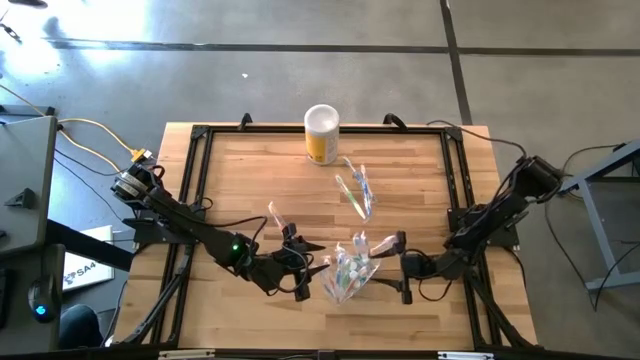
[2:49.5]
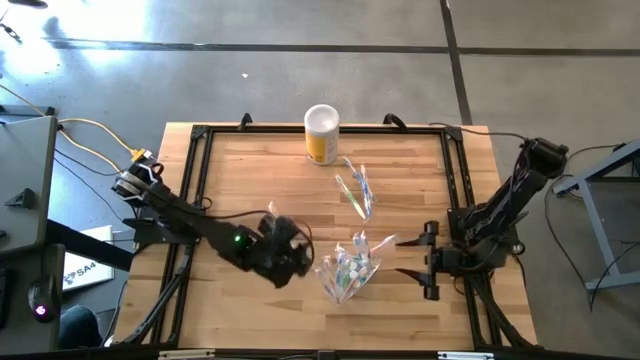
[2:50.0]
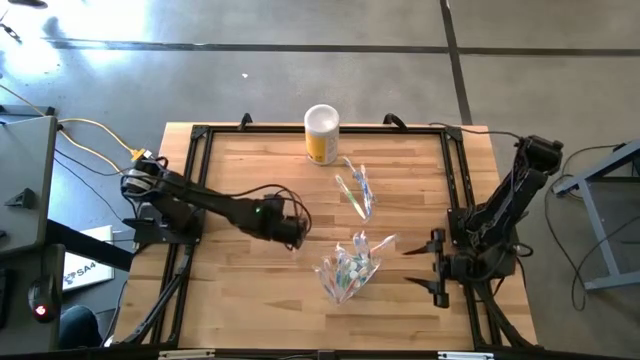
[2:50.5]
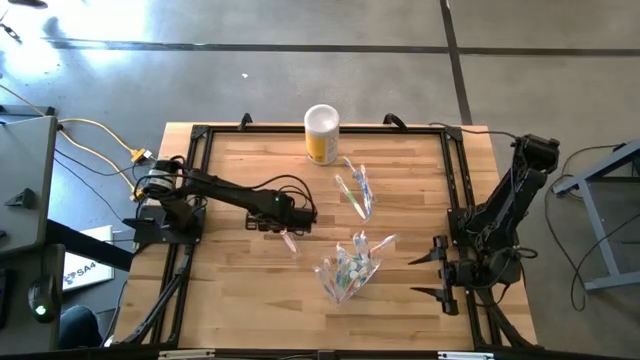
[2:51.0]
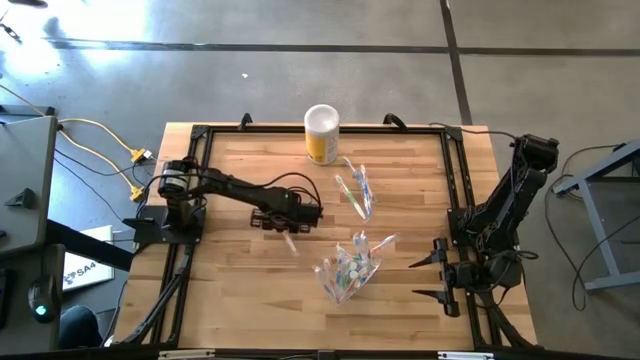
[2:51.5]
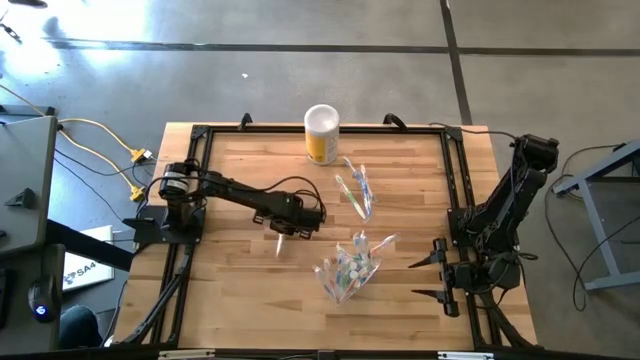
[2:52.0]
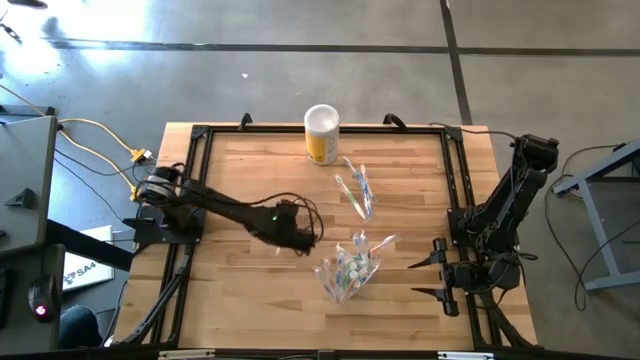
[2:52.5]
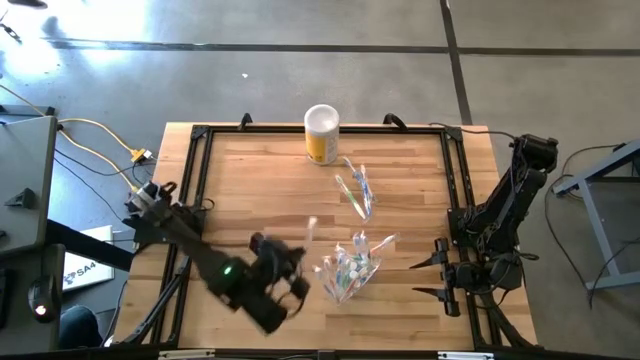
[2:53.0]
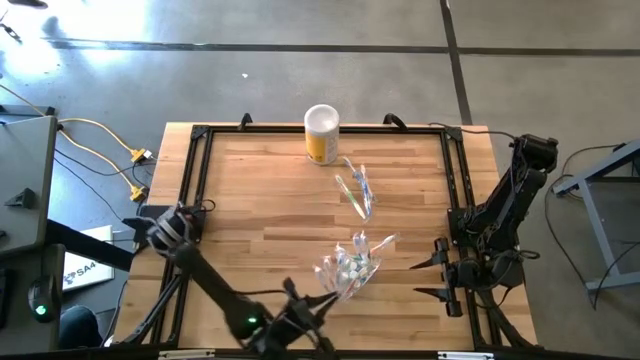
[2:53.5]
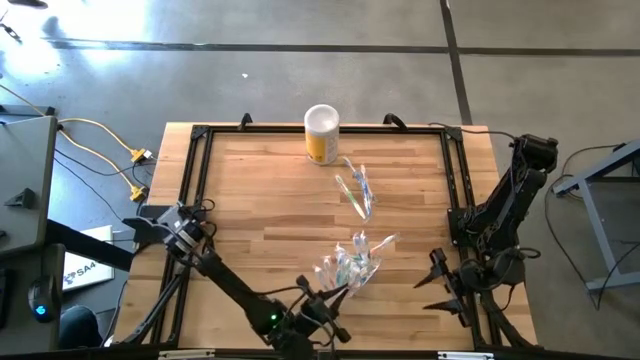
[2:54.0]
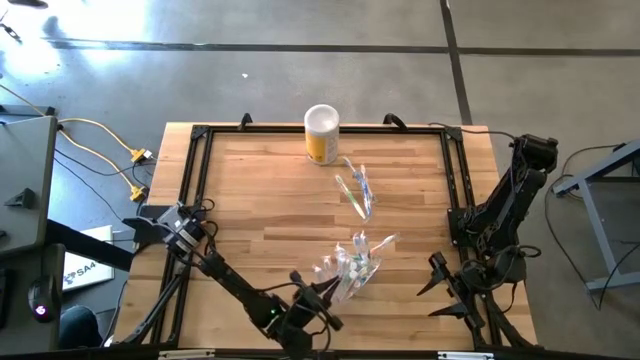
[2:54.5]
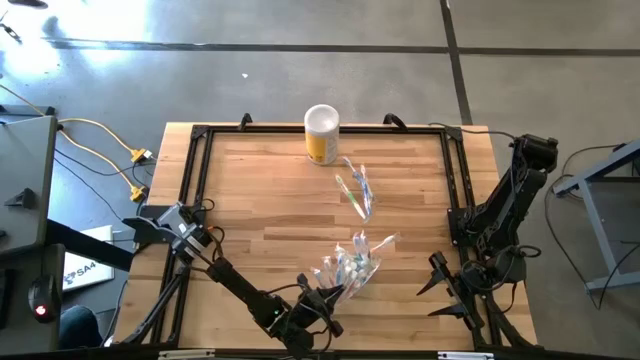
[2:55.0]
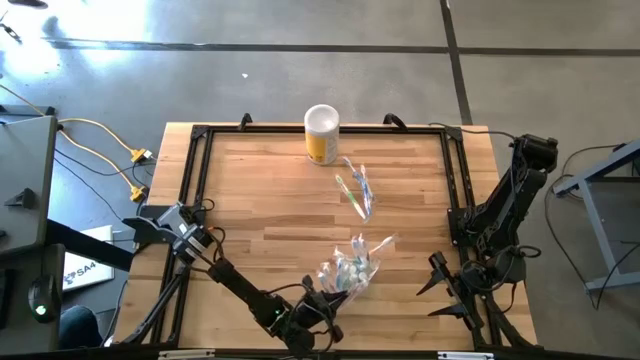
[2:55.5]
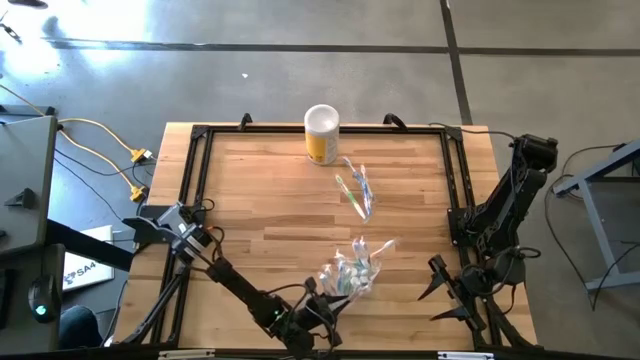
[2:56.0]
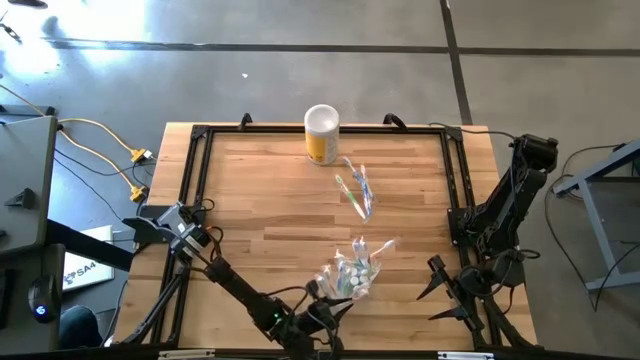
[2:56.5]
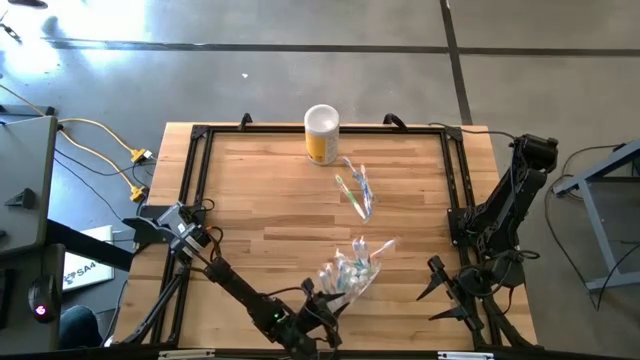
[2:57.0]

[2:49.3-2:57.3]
Task: Pick & Place toothbrushing station
Put the orange toothbrush in the transparent organizer

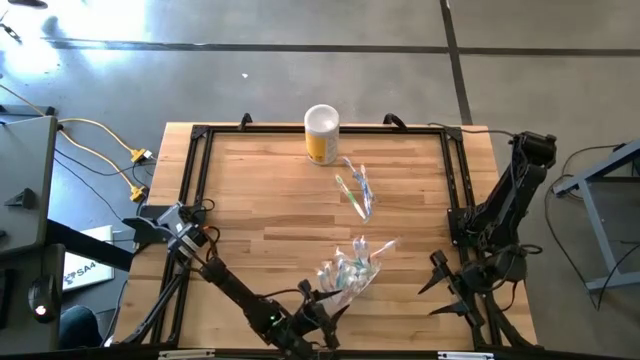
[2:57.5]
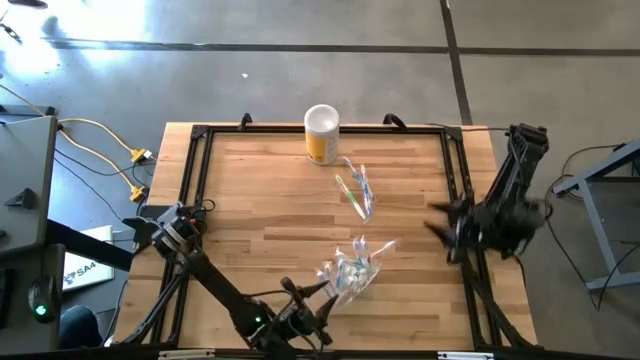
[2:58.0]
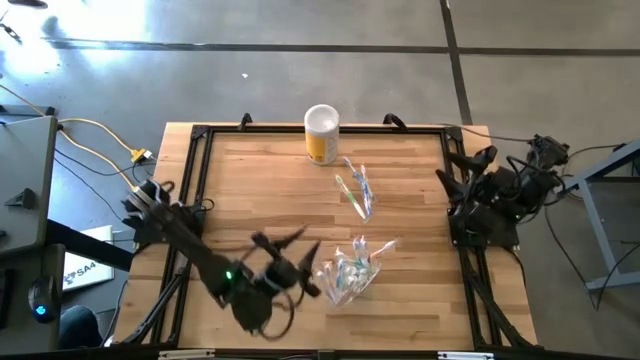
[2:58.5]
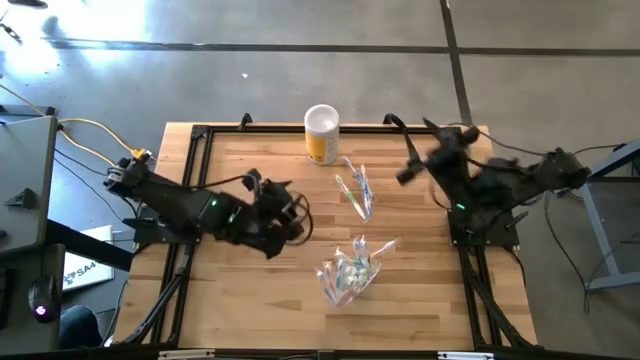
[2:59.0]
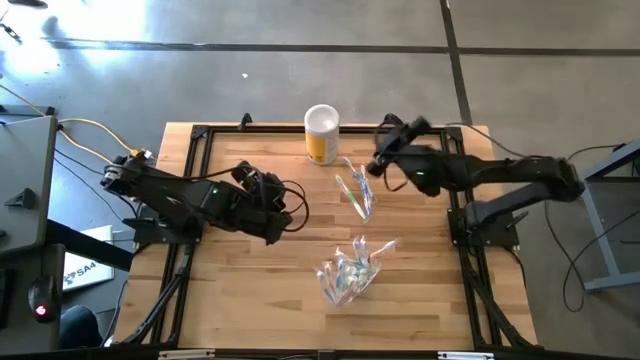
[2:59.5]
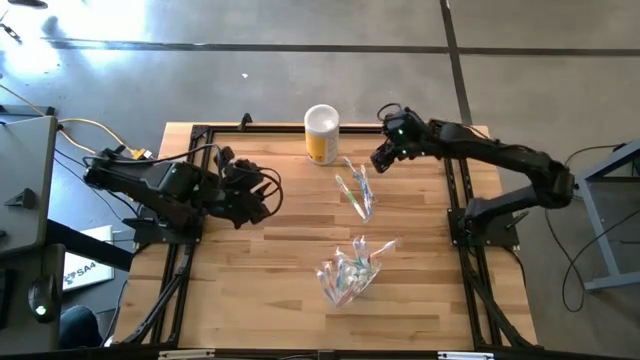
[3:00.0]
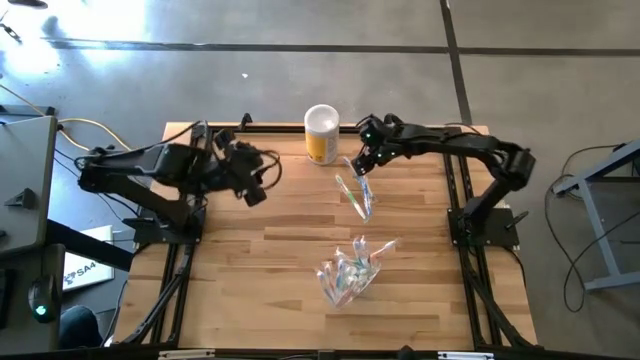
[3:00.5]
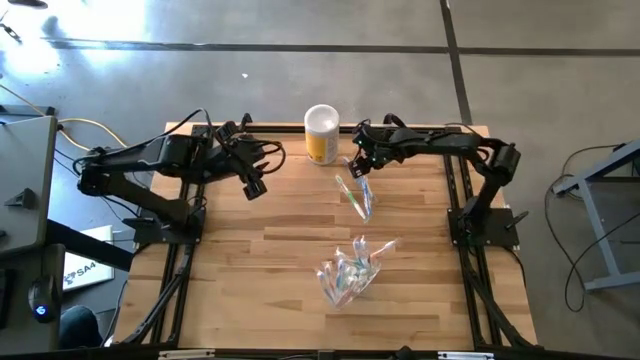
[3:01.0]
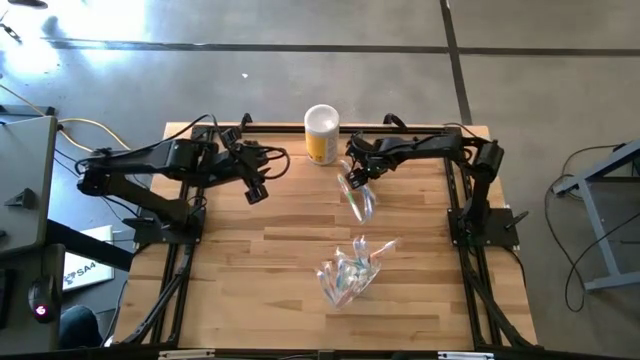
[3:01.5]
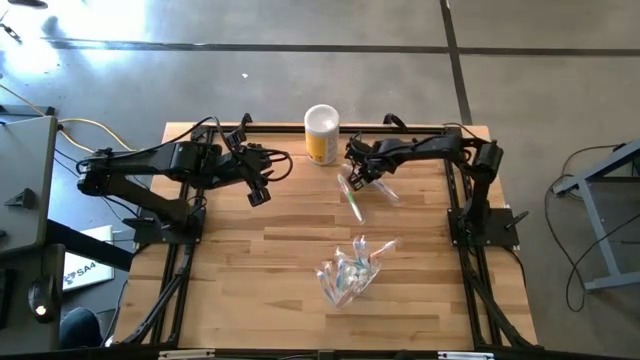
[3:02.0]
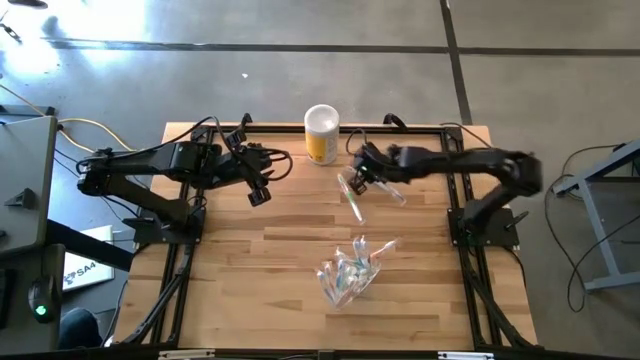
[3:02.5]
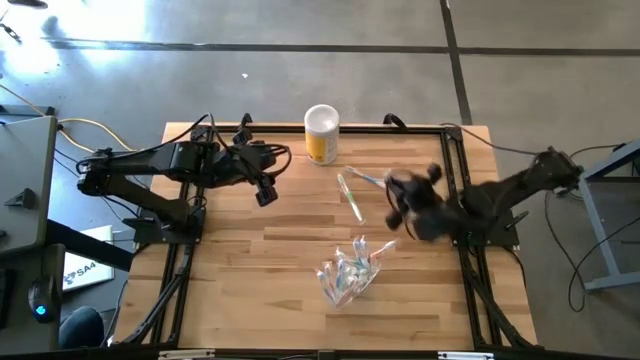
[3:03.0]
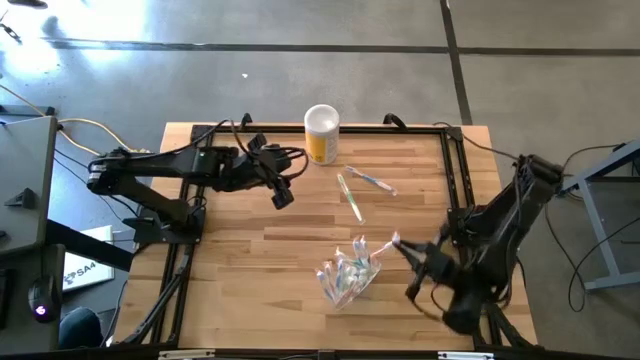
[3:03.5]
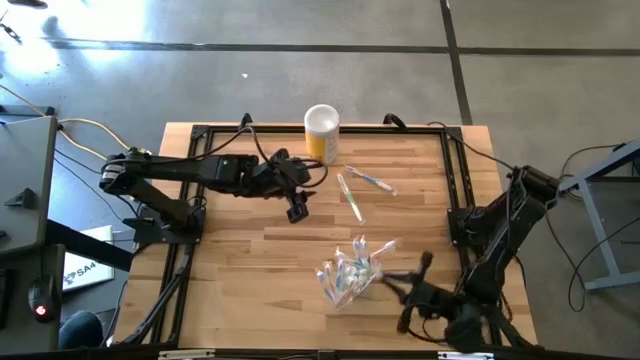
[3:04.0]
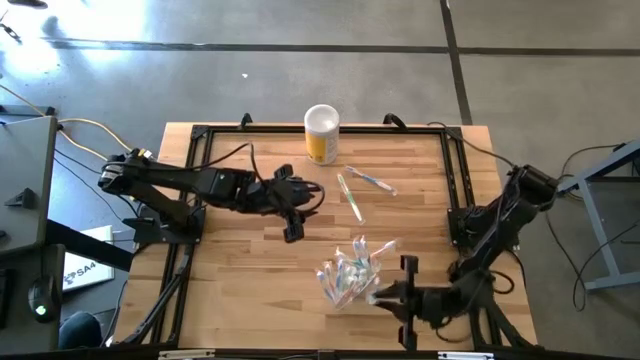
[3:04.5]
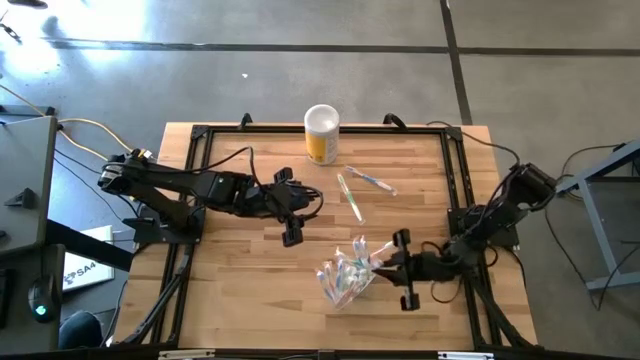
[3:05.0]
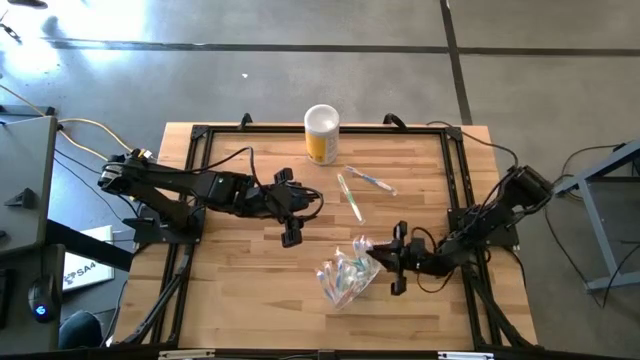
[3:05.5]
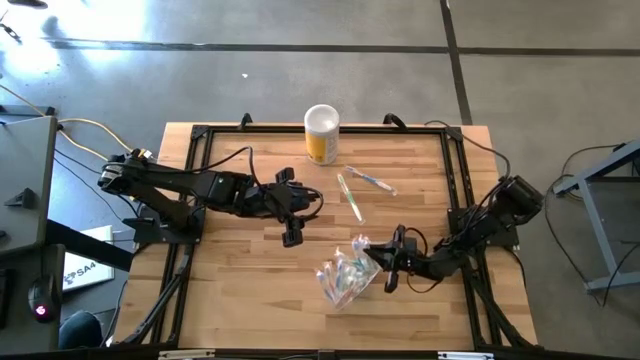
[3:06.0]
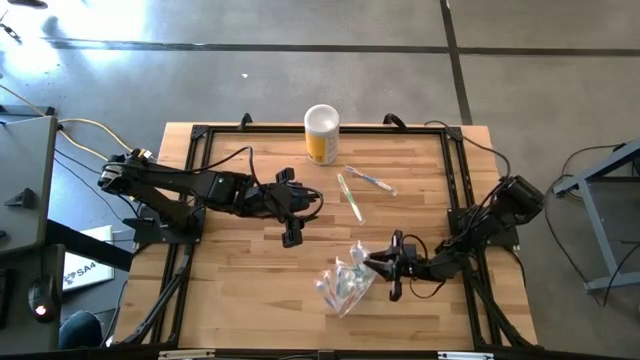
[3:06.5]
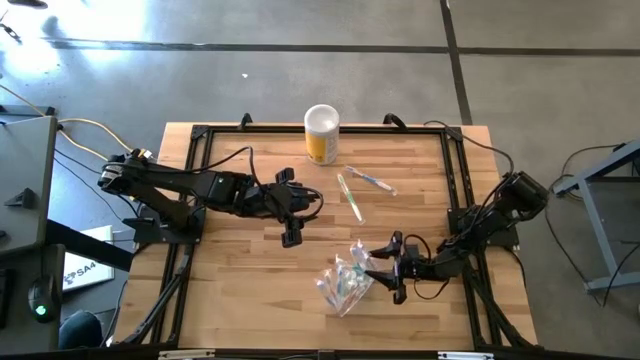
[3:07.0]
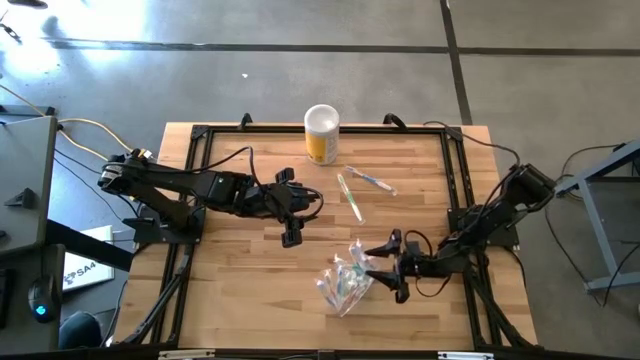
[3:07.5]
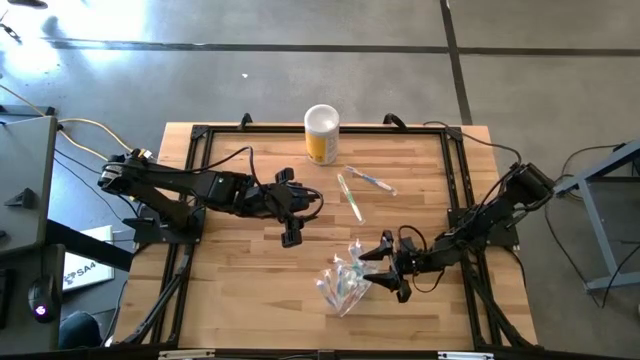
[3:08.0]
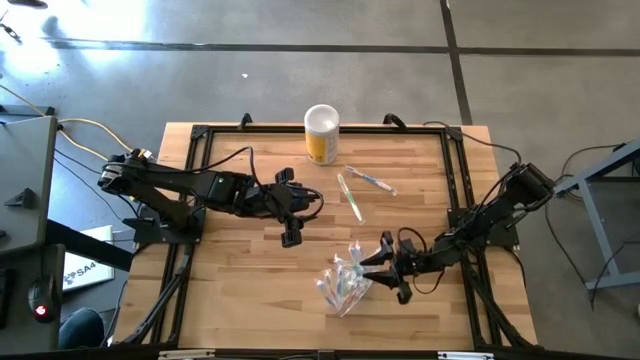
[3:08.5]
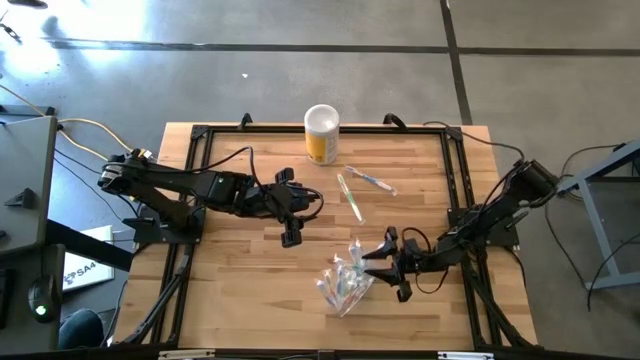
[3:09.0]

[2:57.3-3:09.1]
Put the blue toothbrush in the transparent organizer

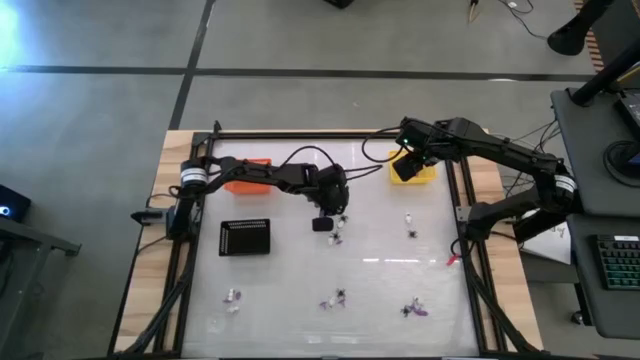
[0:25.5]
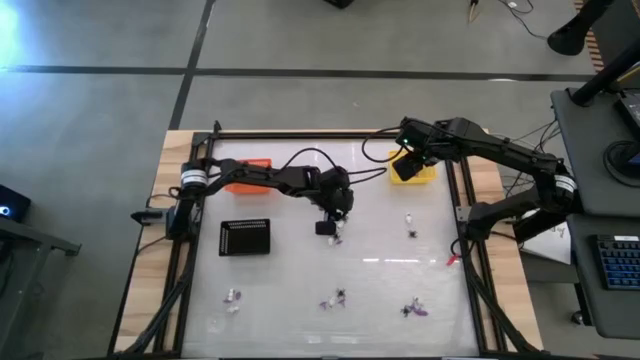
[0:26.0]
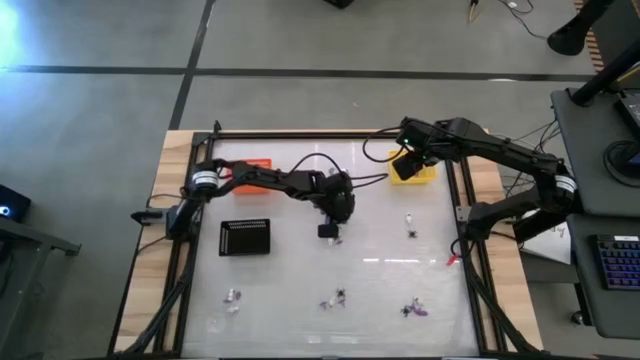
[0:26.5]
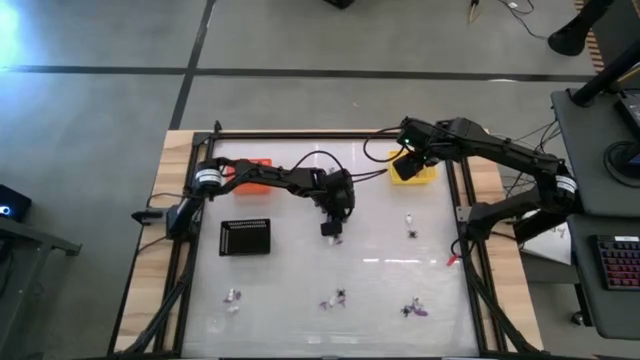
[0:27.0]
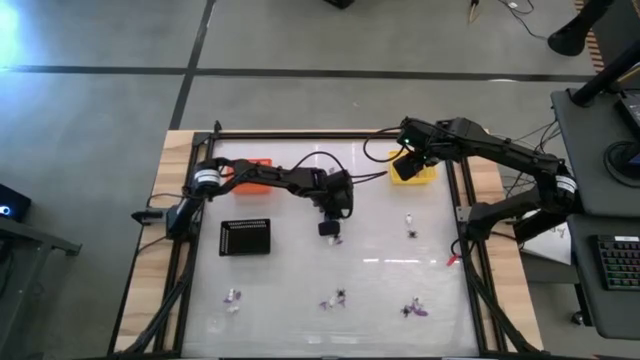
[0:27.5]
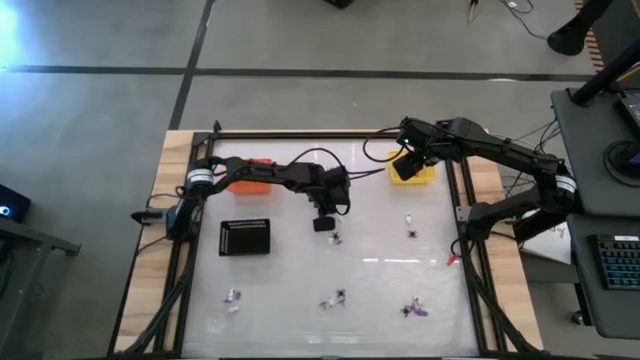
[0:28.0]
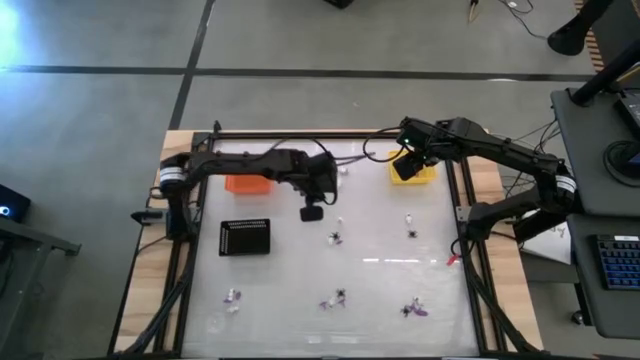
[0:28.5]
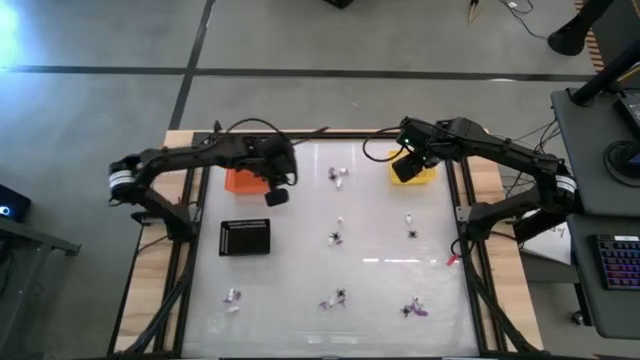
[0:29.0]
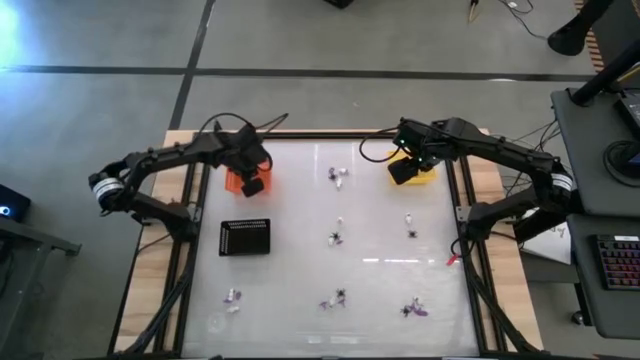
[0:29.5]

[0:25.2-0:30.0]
Task: Sort Halloween decoration
Put the black spider toy into the orange bin
